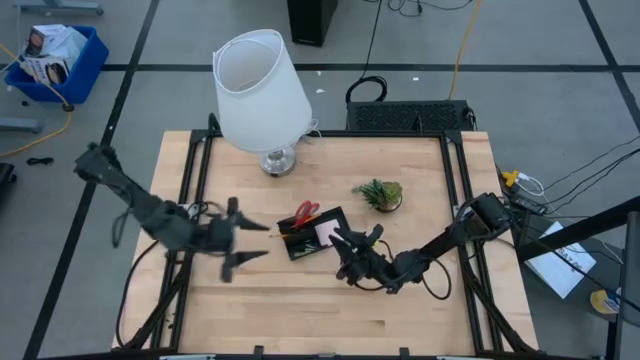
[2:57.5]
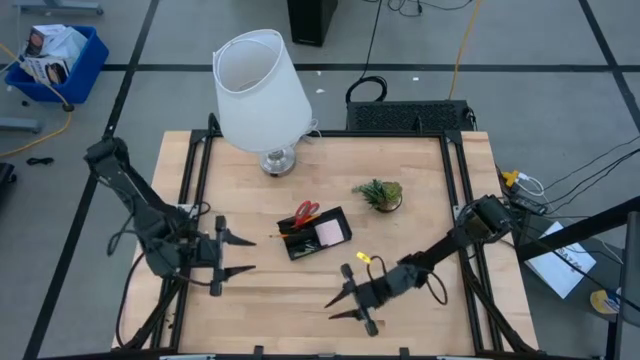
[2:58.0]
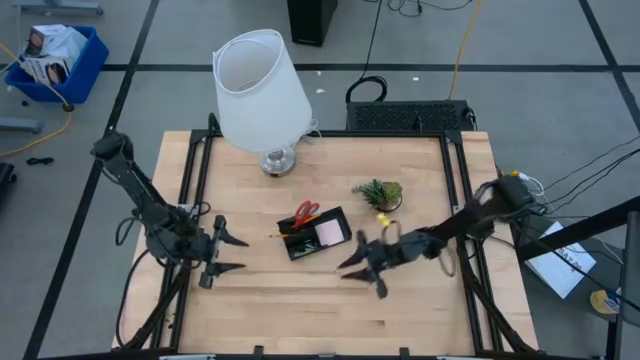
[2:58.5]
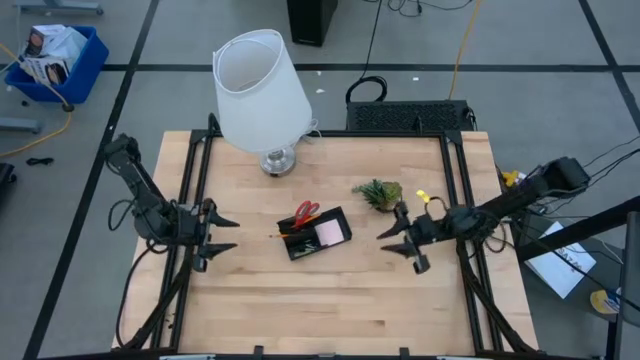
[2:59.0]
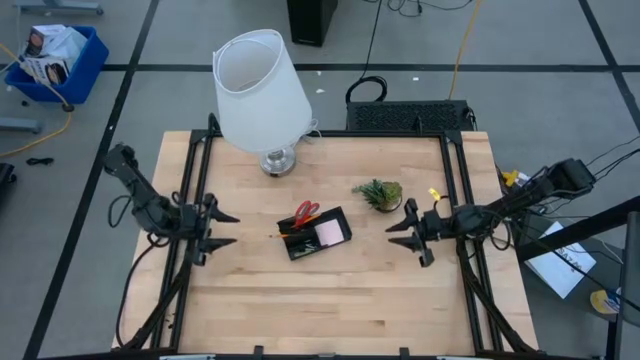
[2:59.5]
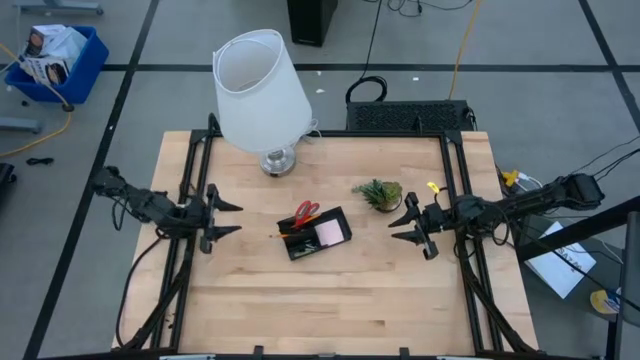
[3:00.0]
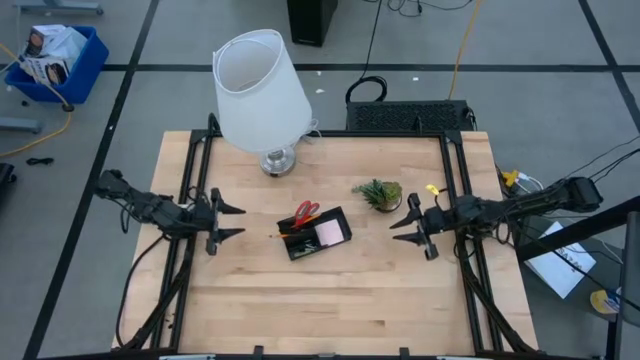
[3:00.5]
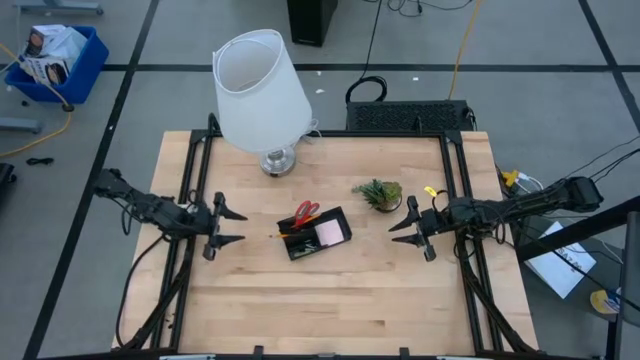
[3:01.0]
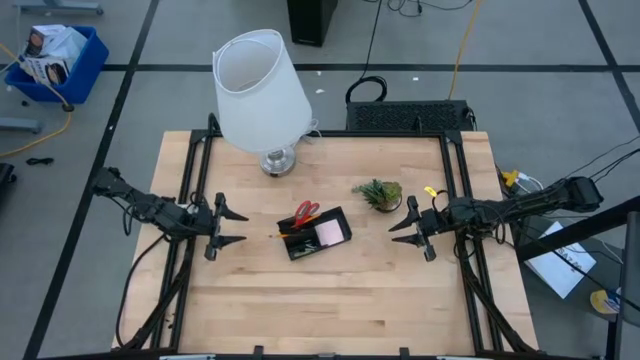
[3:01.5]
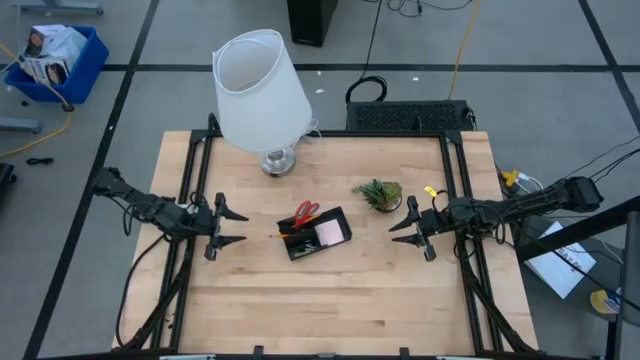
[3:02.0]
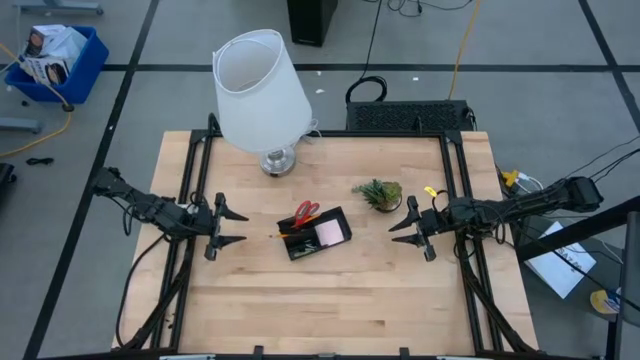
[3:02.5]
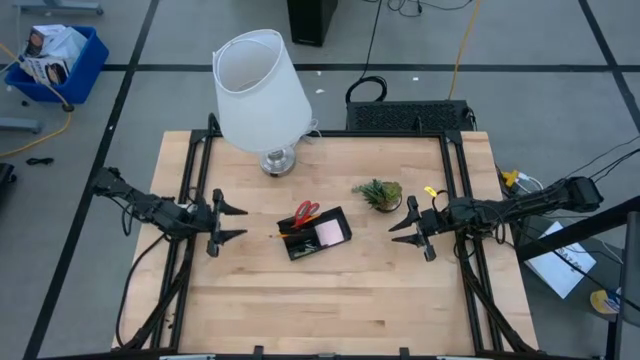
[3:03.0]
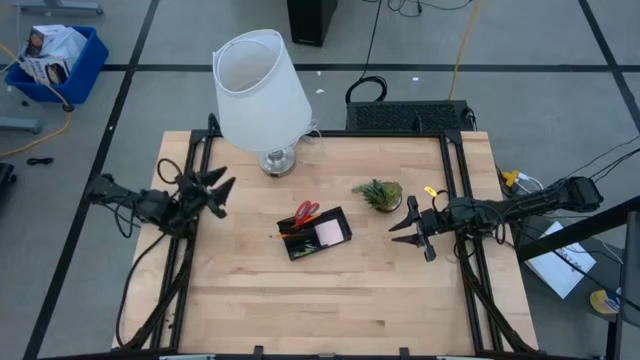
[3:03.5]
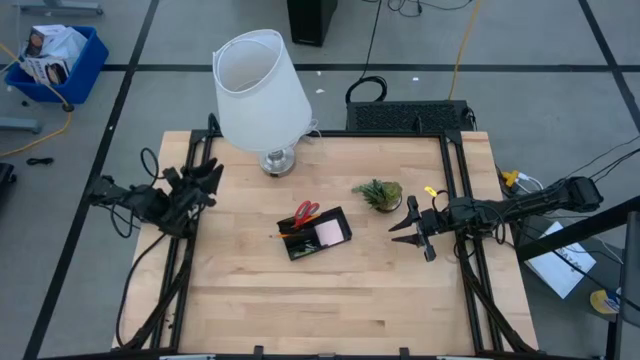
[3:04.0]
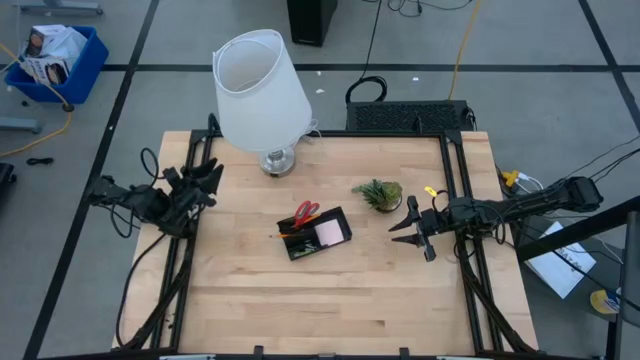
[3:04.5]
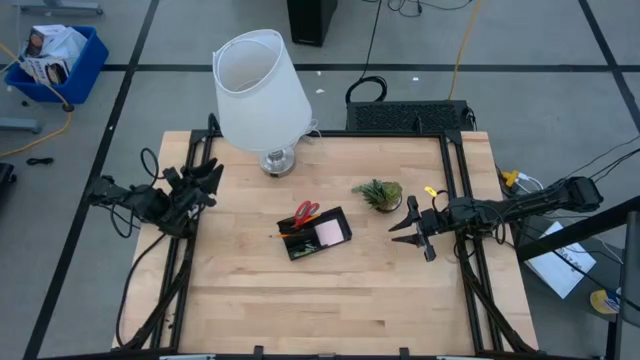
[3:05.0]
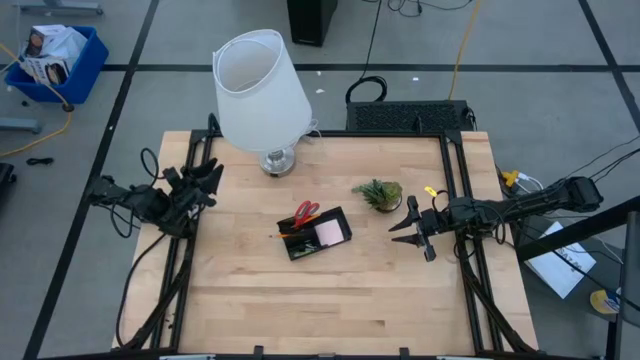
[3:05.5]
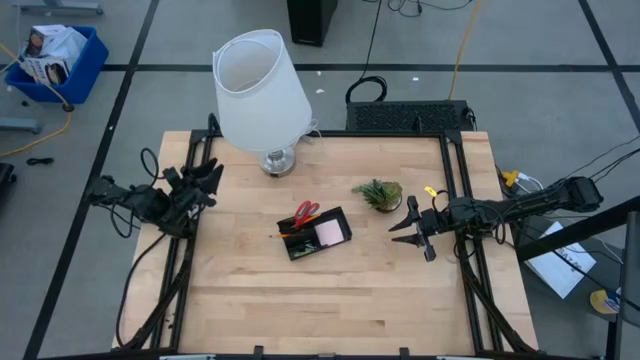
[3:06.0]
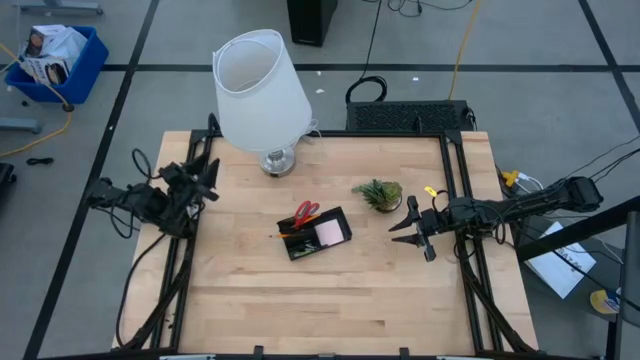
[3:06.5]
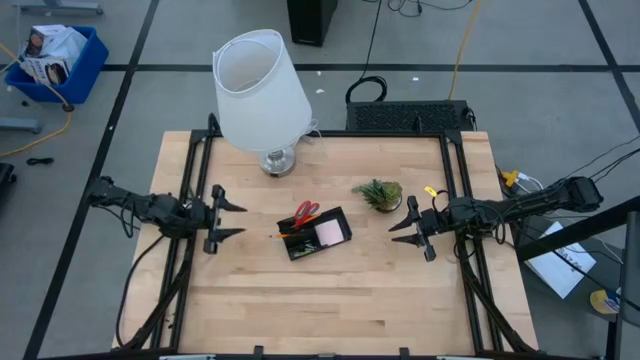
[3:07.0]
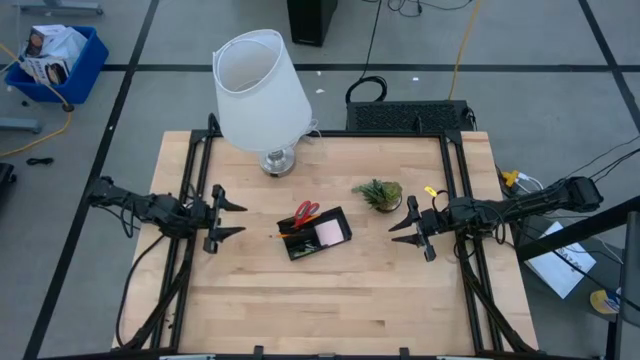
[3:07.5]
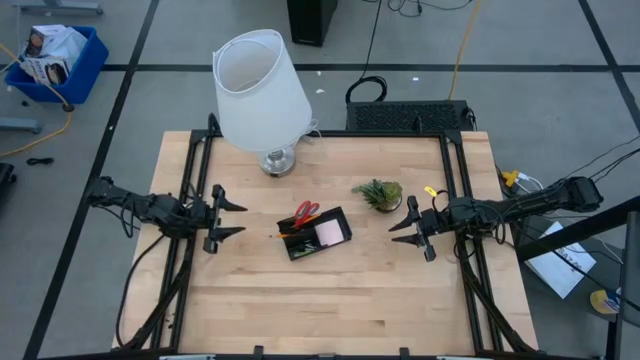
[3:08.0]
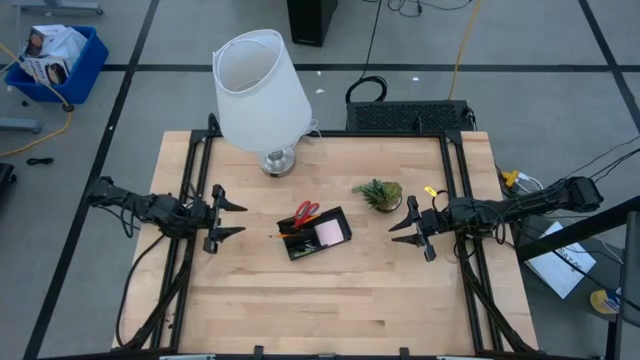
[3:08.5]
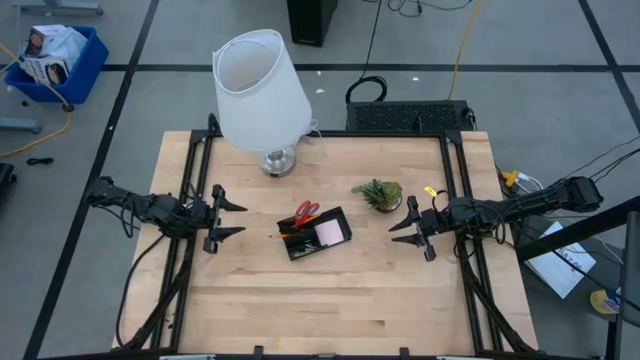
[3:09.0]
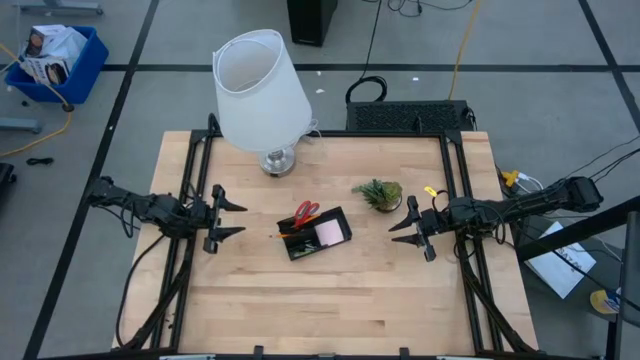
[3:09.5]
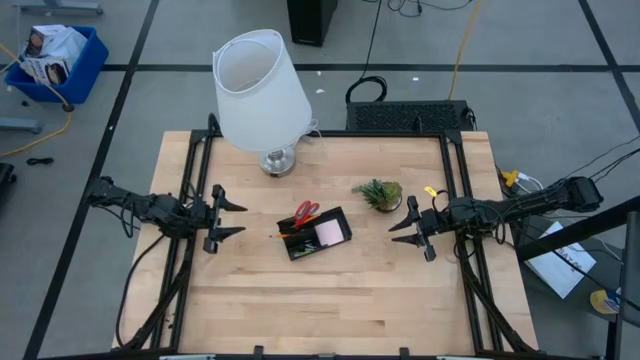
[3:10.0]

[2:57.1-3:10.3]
Task: Pick and place office supplies into organizer
Return to Home Position

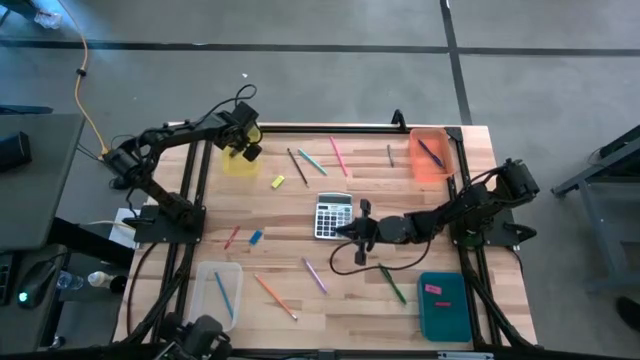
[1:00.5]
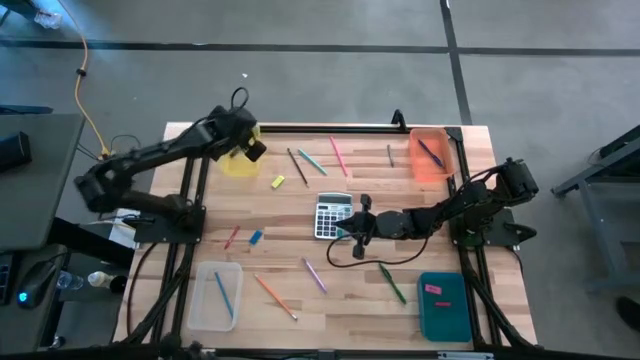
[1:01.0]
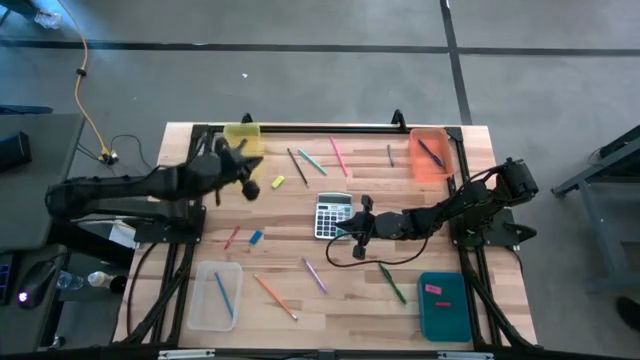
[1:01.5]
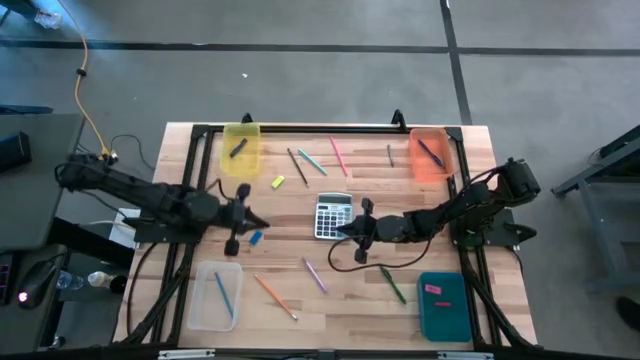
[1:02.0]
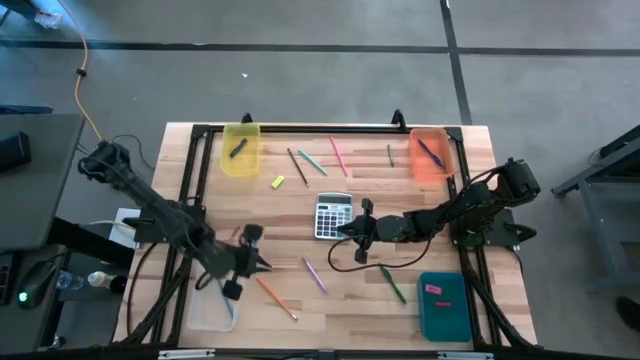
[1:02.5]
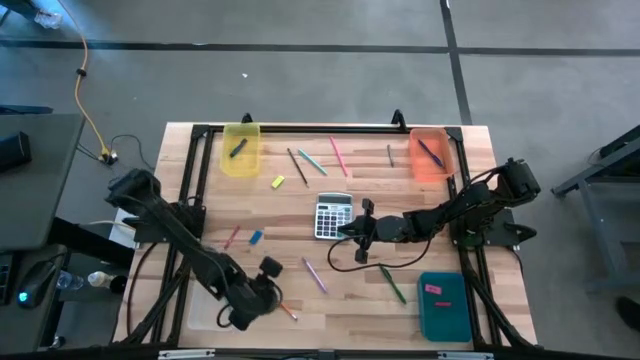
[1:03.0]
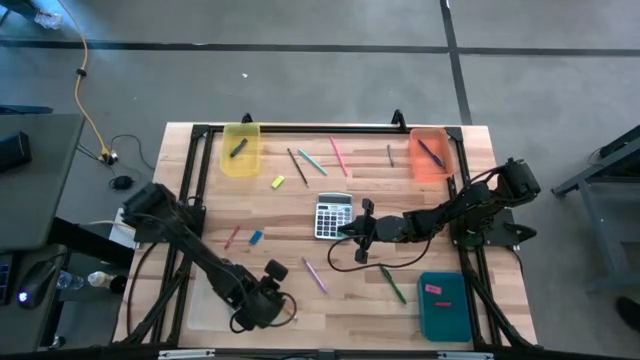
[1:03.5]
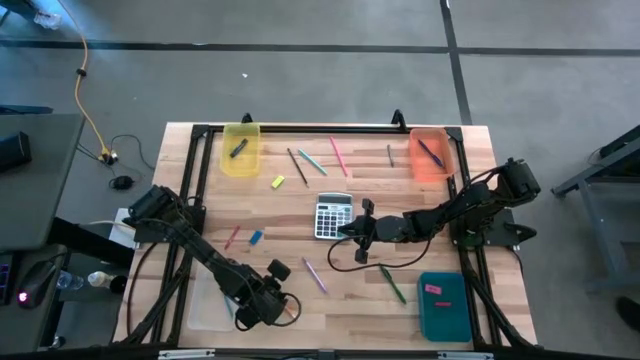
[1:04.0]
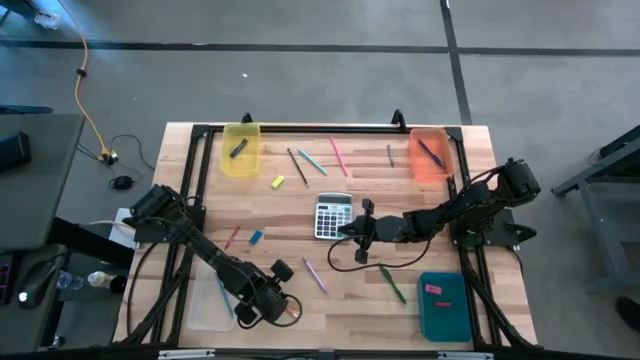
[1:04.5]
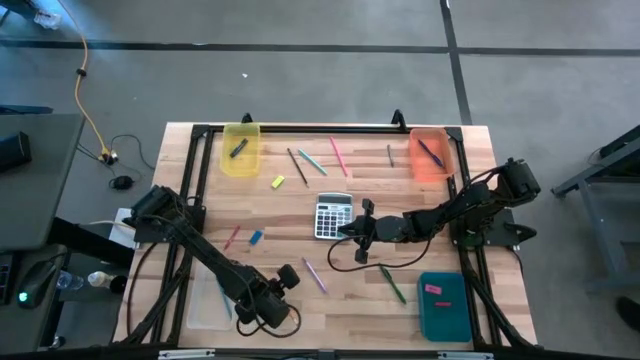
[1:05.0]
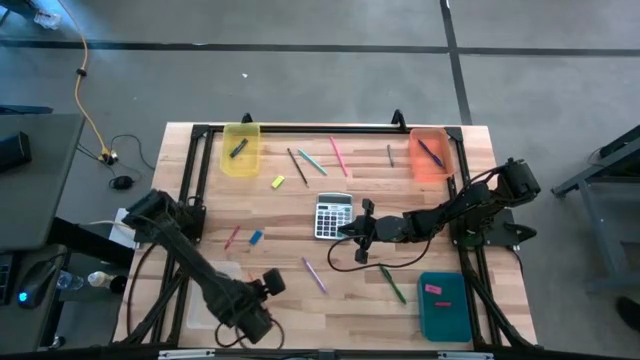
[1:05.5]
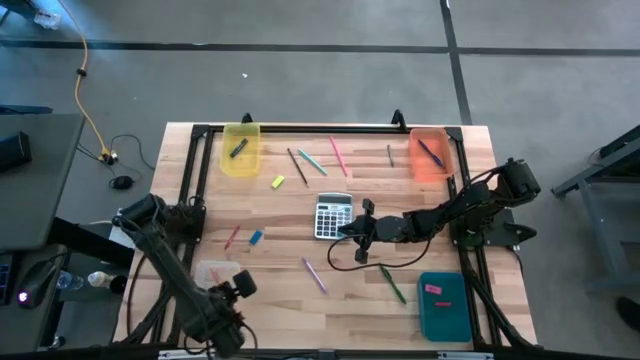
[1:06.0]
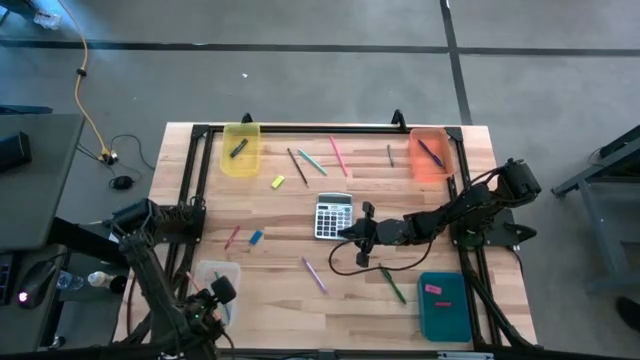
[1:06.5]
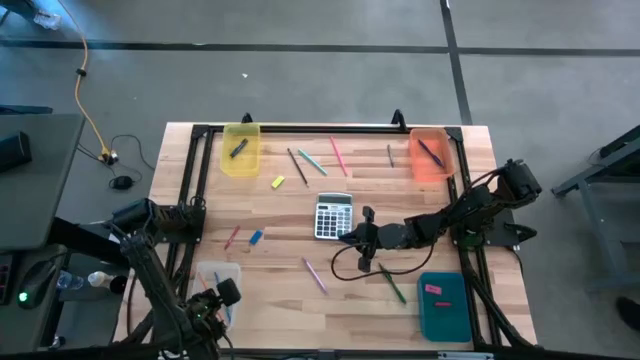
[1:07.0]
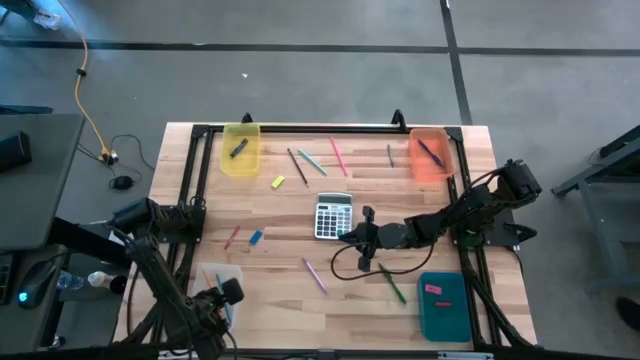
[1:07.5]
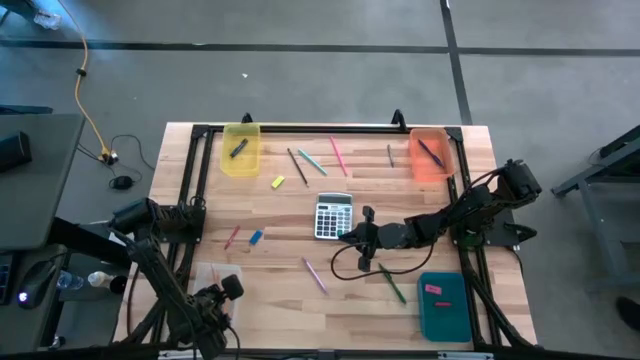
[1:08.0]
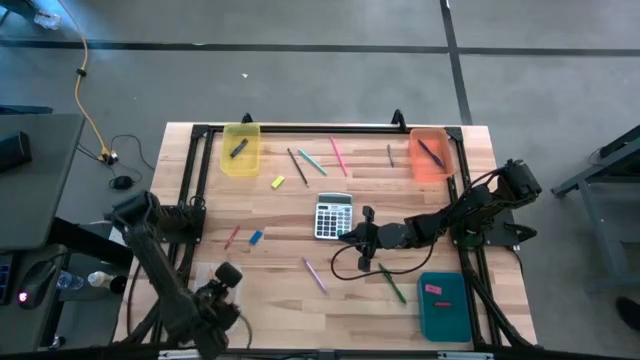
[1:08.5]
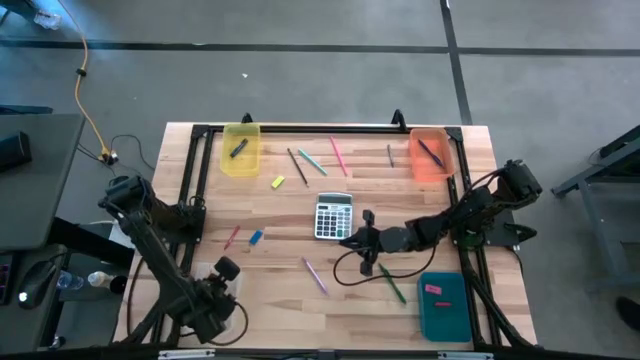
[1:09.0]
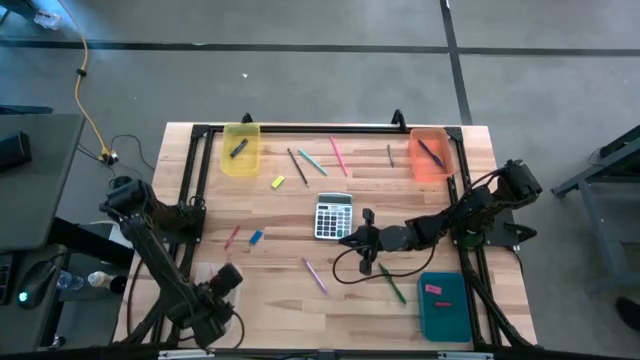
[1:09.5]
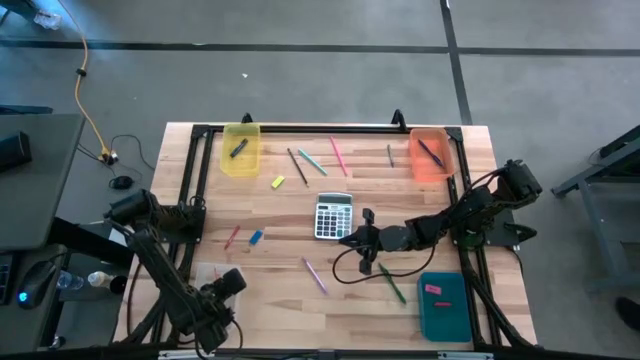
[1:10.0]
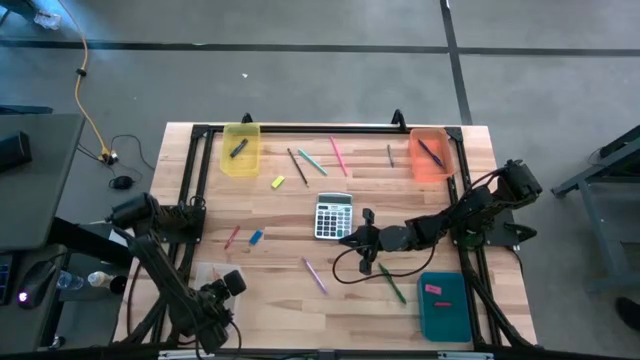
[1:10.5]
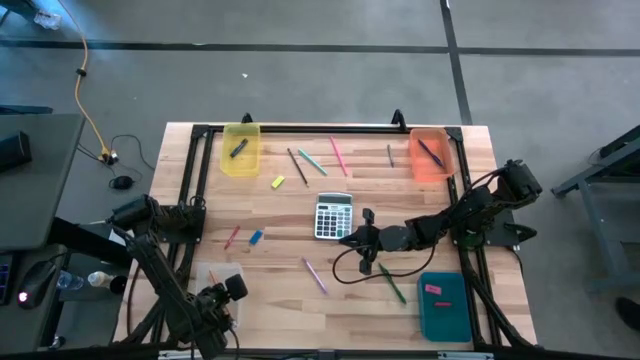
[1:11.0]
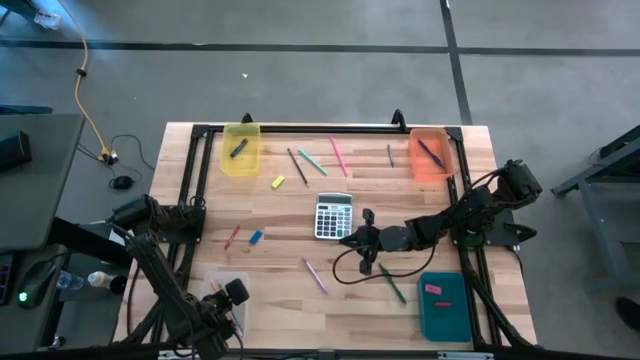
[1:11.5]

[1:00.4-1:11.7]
Task: Sort crayons/erasers/pens/pencils in bins
Put the yellow pencil into the transparent bin
